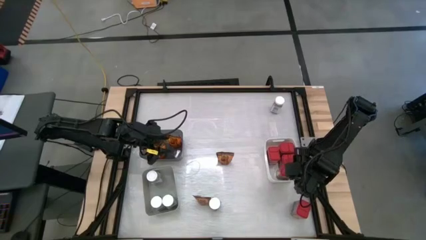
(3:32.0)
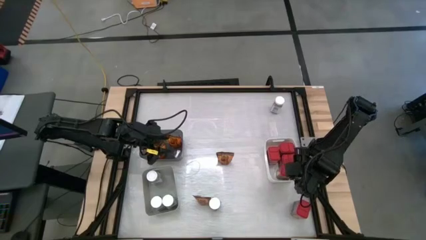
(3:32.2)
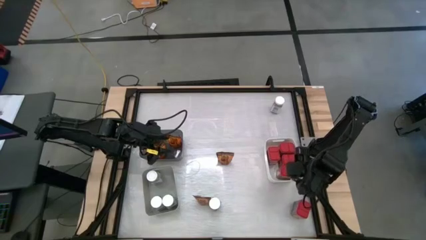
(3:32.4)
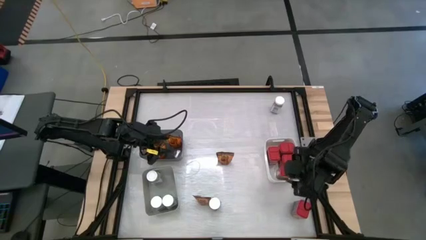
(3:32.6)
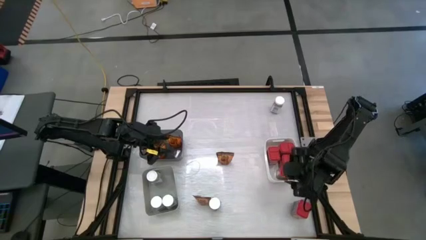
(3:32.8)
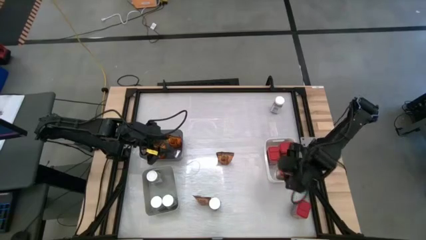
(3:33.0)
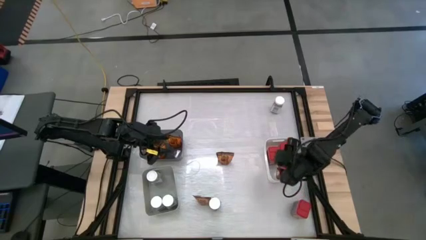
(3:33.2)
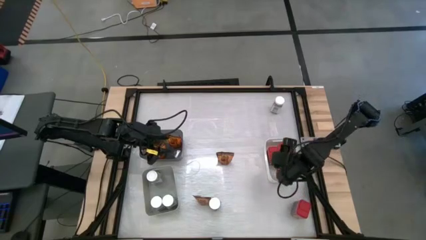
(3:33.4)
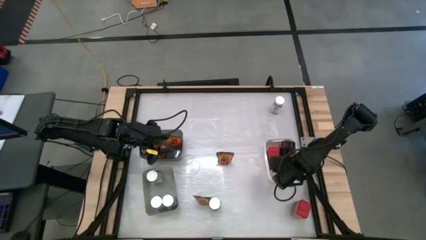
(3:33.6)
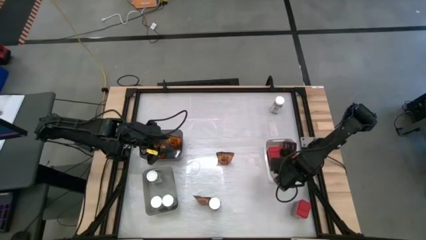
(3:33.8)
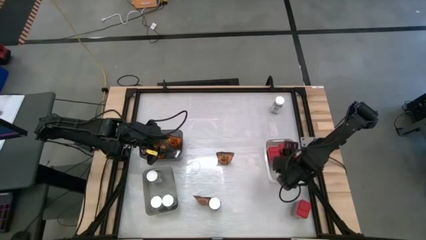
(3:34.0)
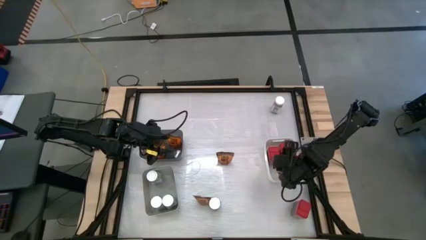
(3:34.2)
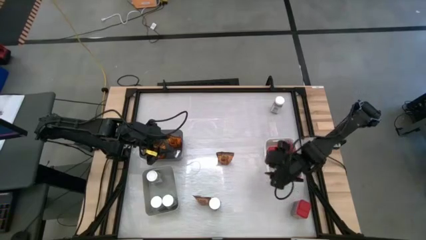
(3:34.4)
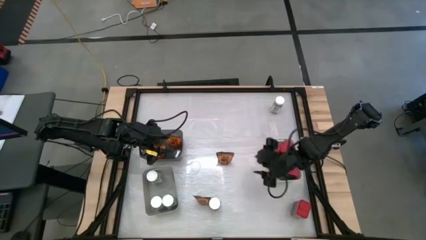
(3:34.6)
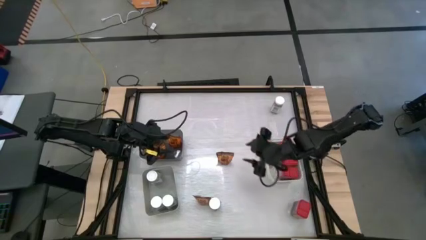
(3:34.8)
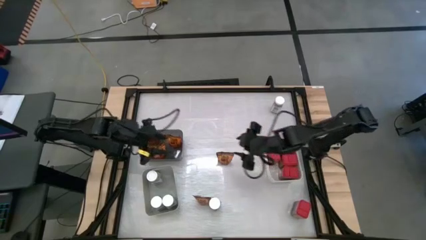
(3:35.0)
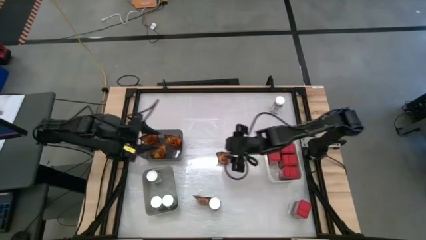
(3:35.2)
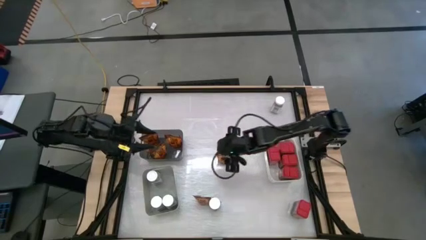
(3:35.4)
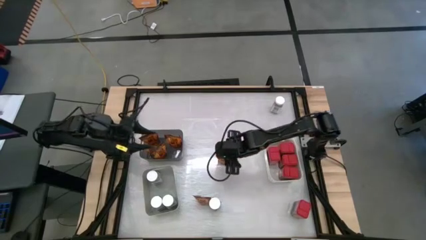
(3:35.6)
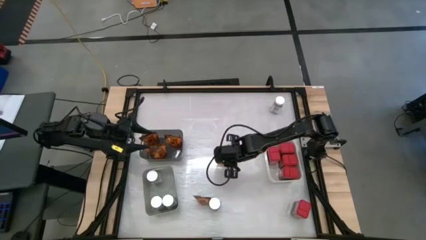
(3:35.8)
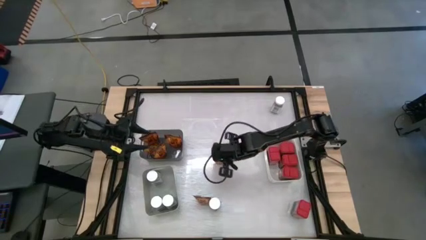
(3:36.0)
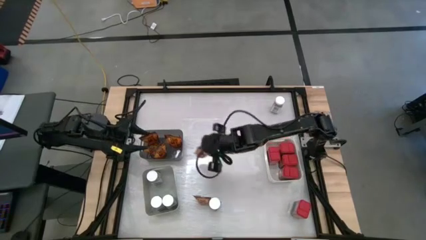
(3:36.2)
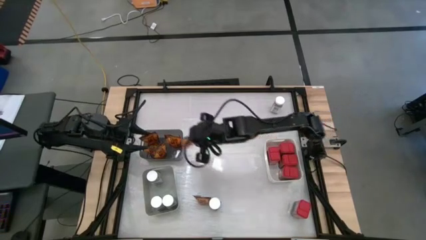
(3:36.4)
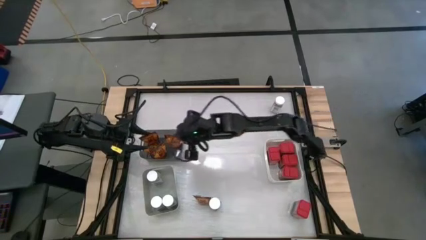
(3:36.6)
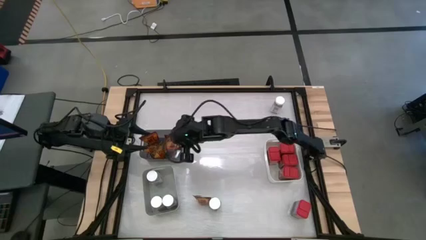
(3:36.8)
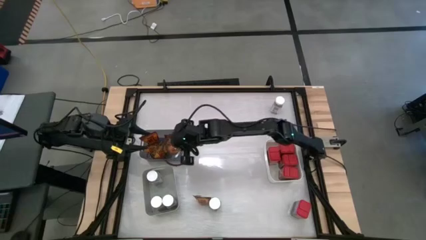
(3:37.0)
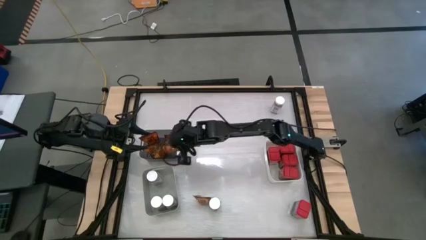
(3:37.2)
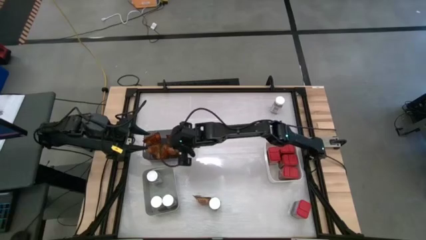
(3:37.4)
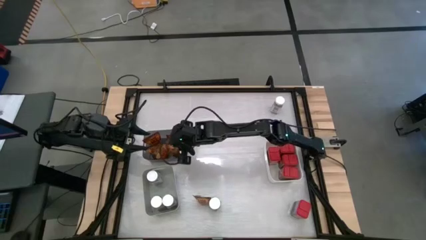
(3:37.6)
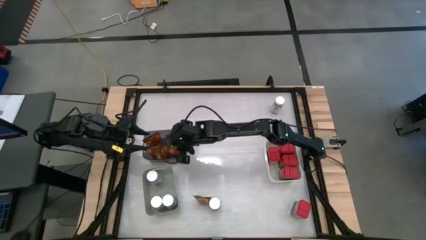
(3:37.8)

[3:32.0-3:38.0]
Task: Sort spices by type
Put the orange spice pack into the transparent black bin
